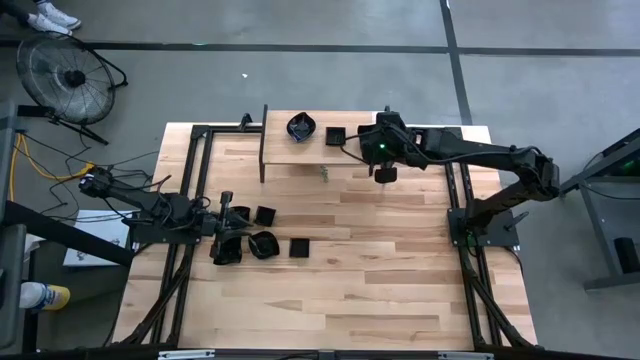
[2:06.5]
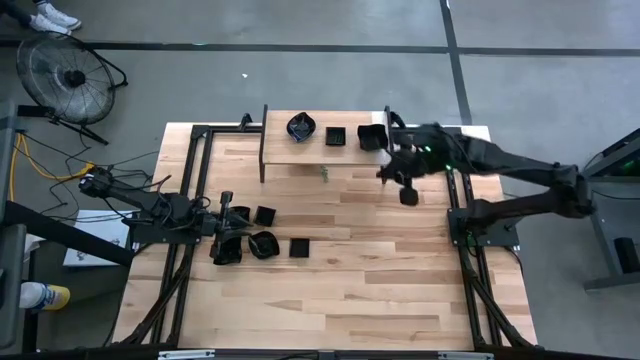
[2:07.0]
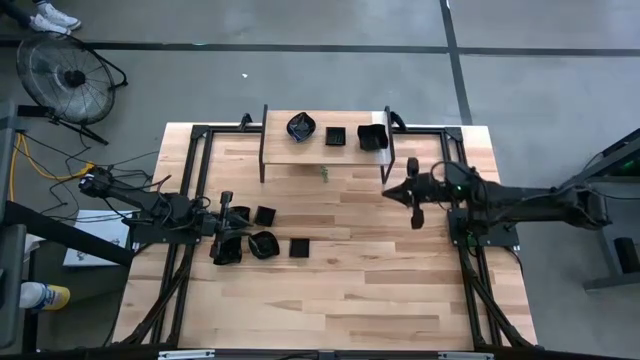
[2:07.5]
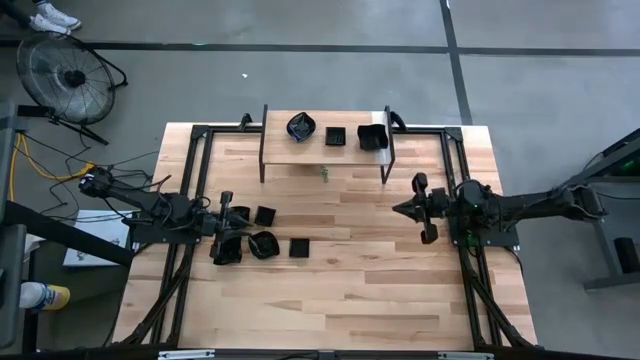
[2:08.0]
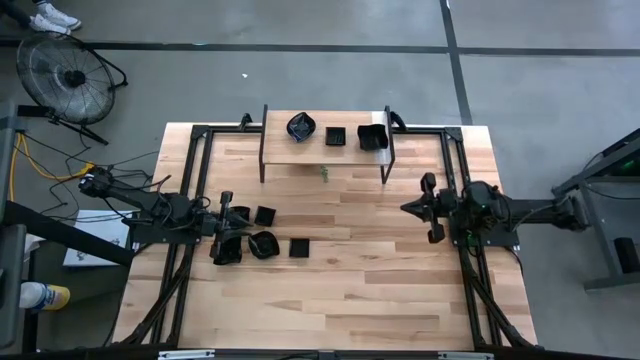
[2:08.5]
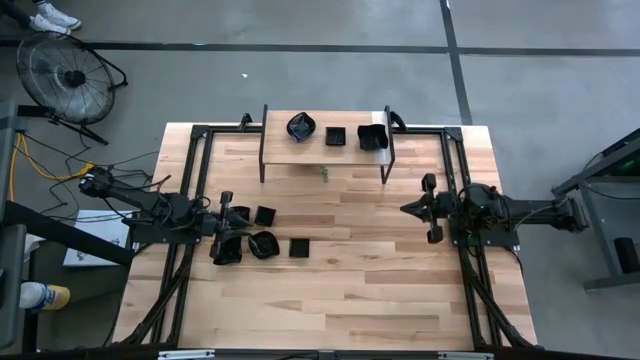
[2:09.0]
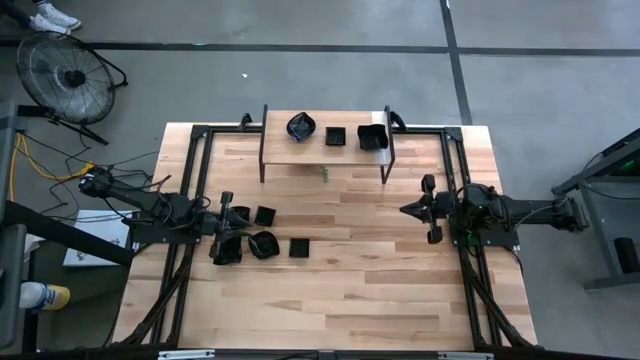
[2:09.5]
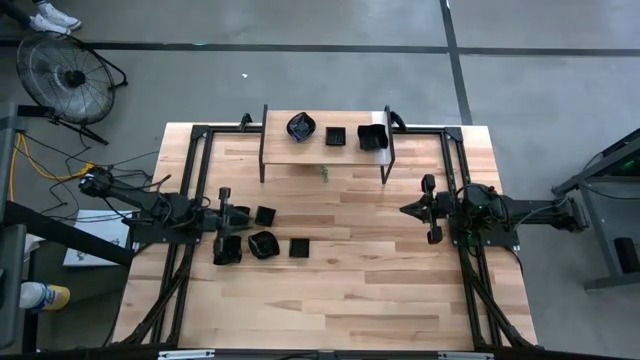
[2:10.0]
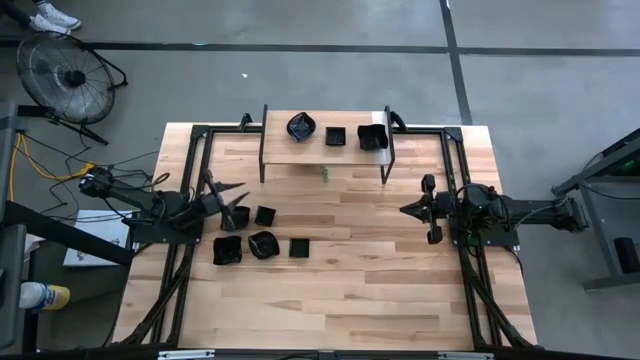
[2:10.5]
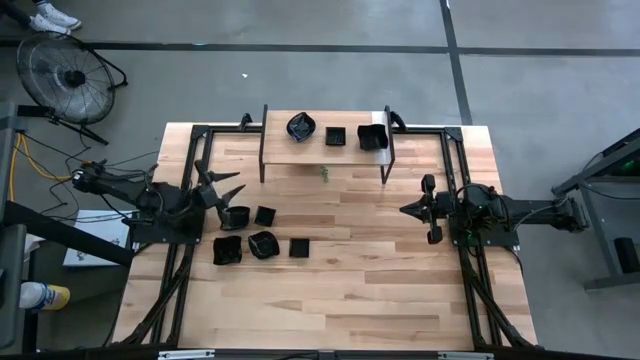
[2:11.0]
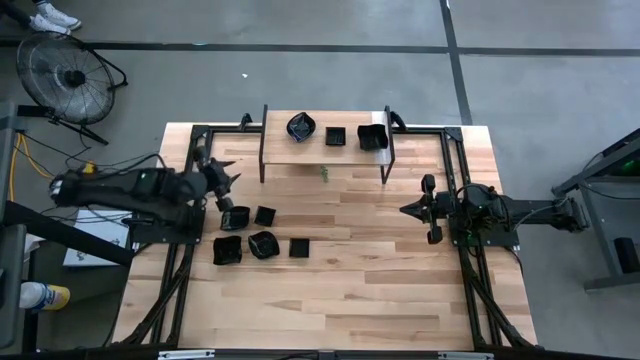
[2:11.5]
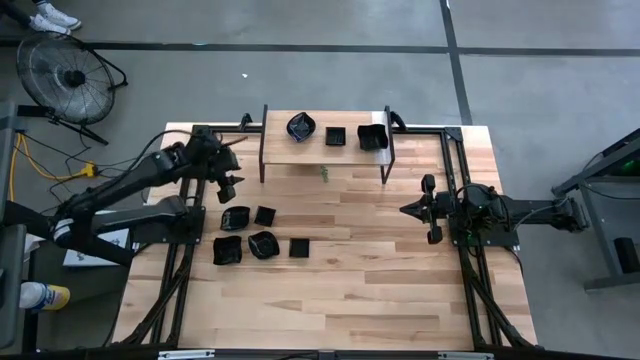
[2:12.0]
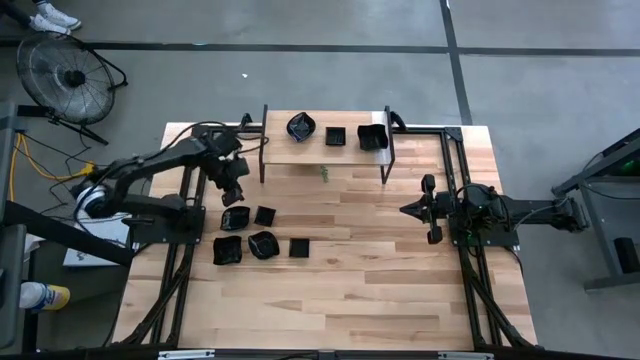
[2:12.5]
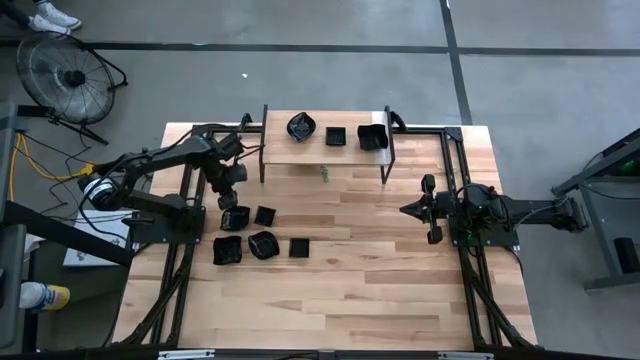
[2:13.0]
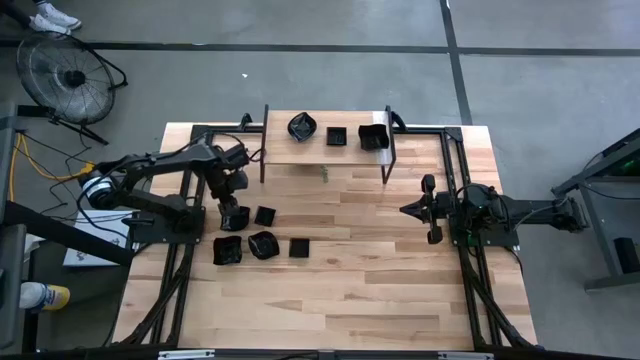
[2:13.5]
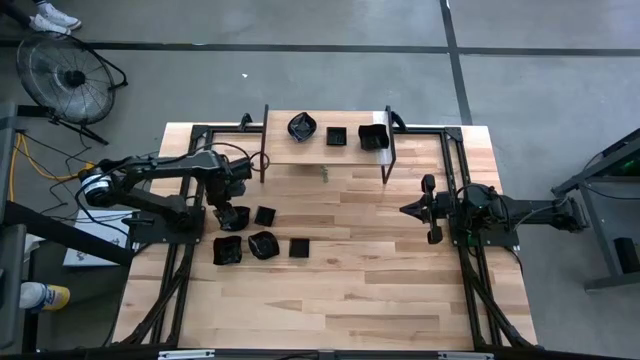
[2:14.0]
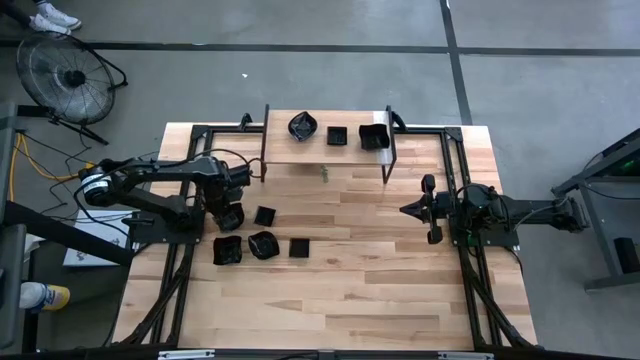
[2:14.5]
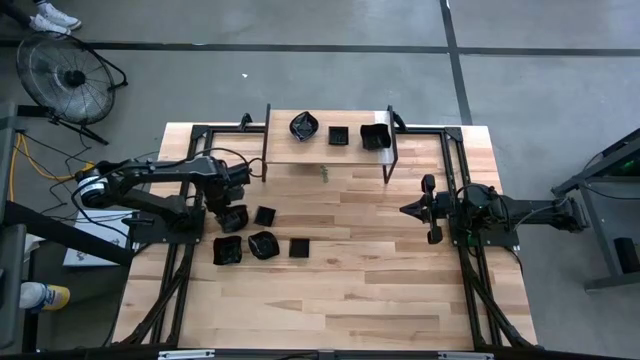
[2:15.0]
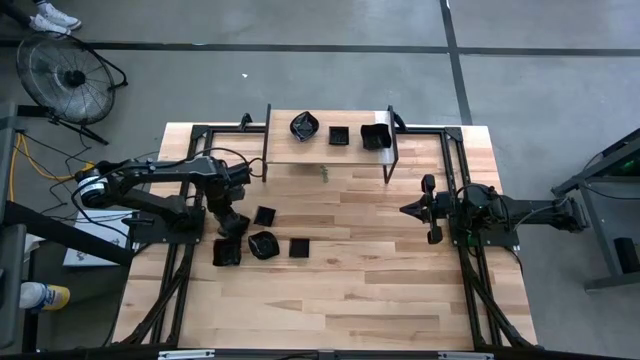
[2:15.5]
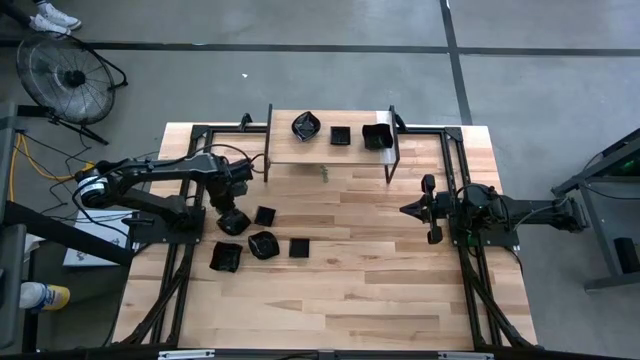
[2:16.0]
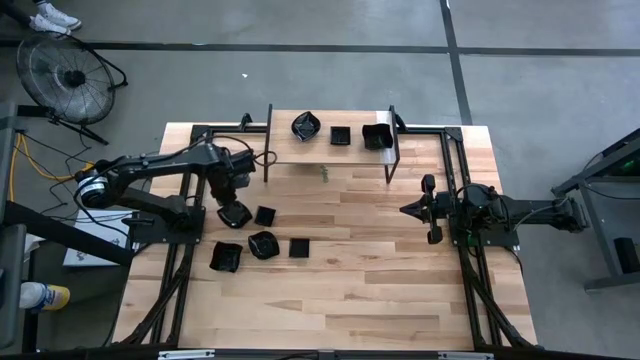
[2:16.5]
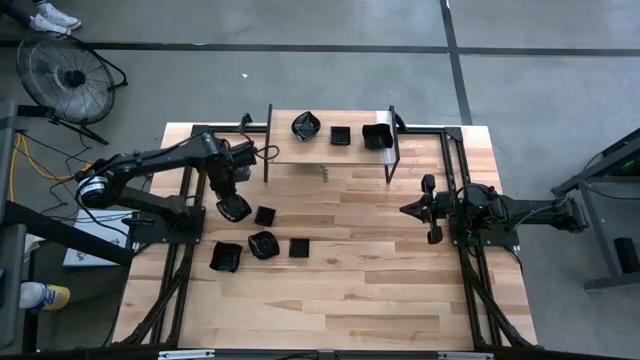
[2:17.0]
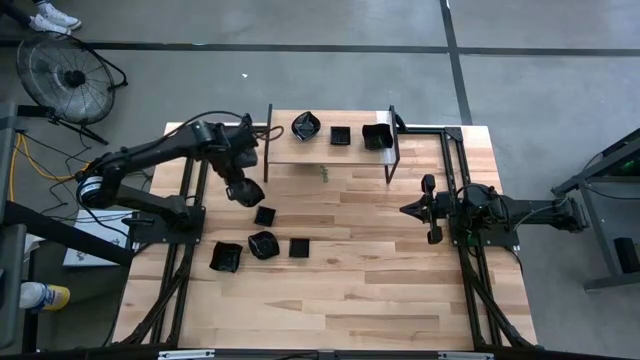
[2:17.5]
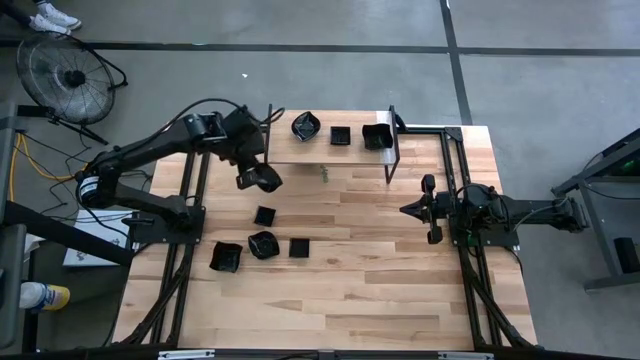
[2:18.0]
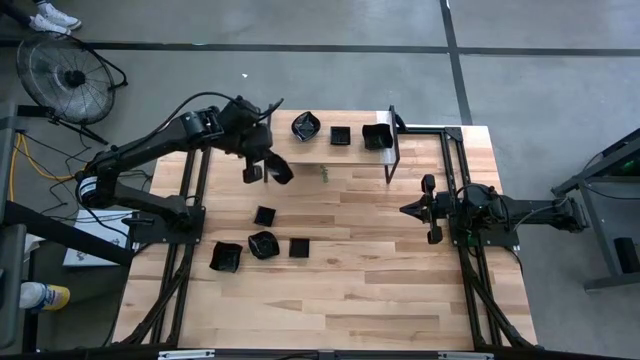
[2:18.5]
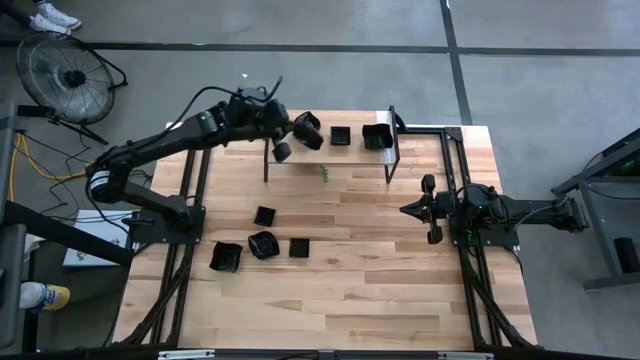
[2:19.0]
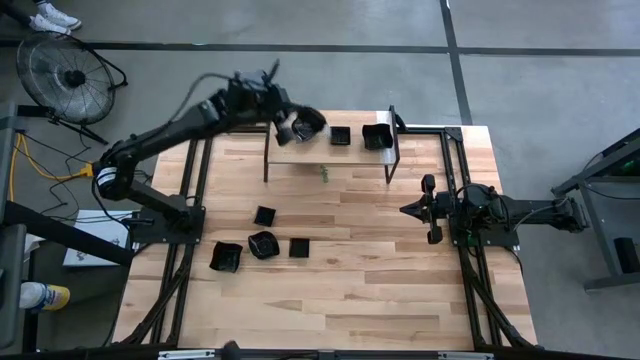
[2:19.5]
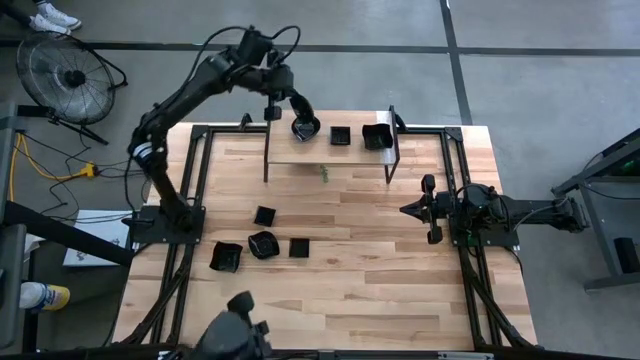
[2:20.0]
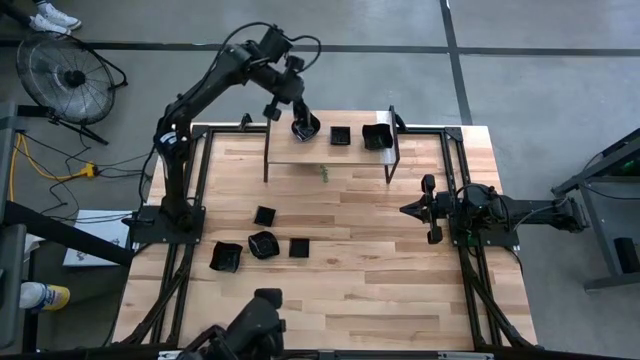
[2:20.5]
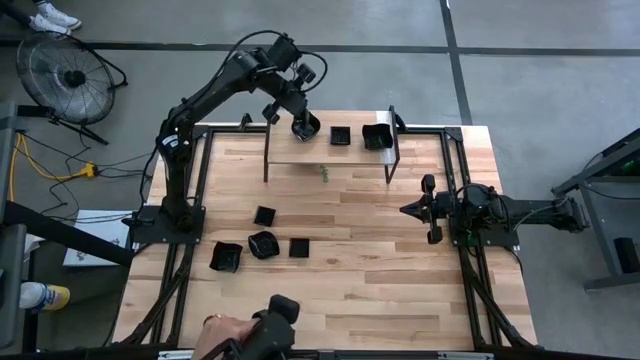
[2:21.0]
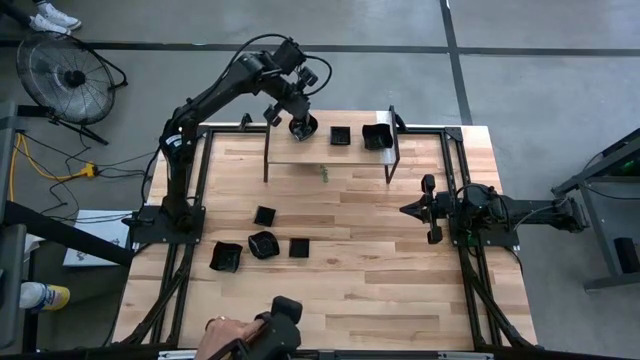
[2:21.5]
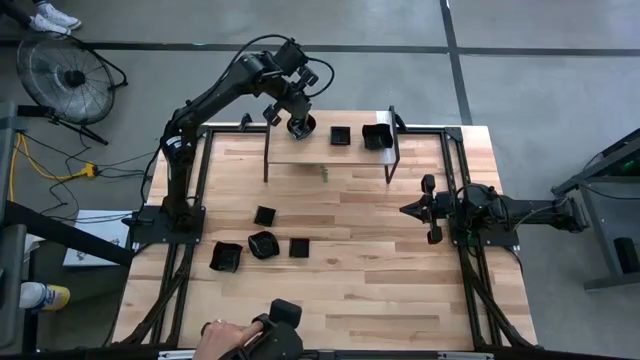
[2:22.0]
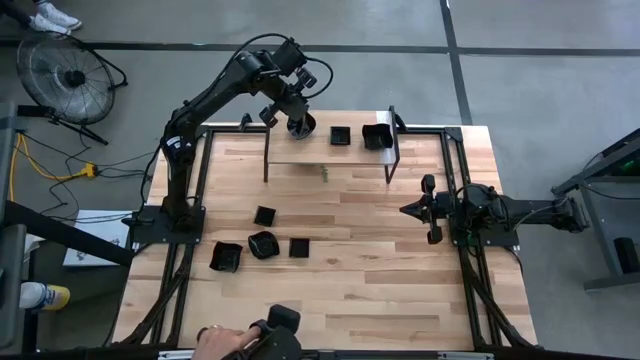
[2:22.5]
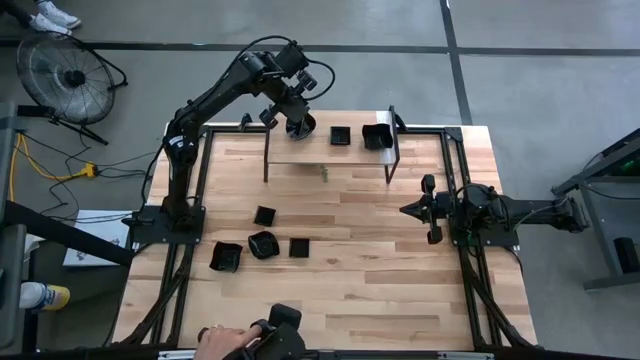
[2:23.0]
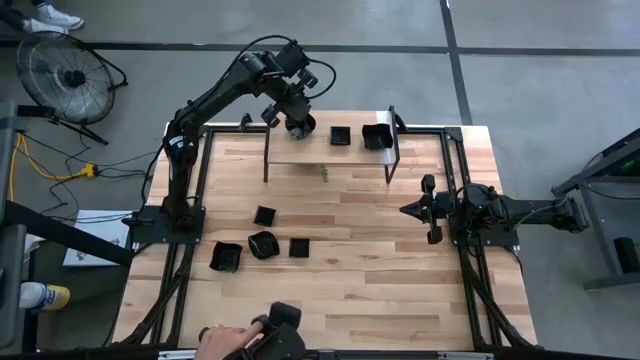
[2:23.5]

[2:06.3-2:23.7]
Task: Pick & Place Mini shaped plates
Stack the leaf shaped plate on top of the other leaf shaped plate on the shelf

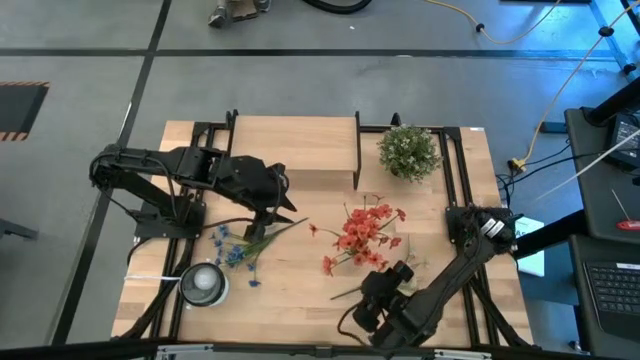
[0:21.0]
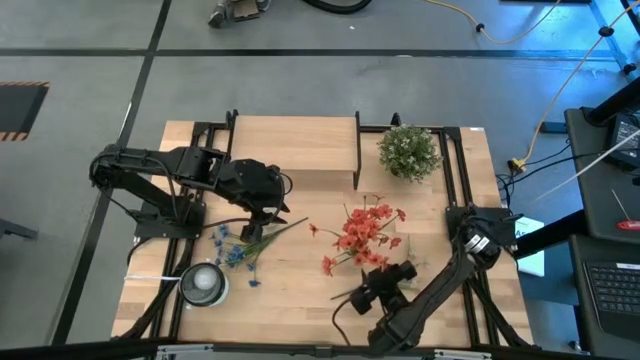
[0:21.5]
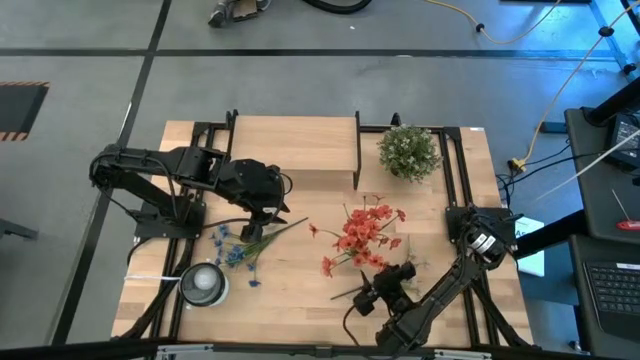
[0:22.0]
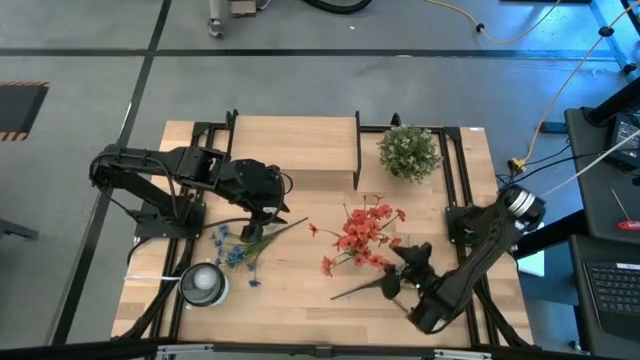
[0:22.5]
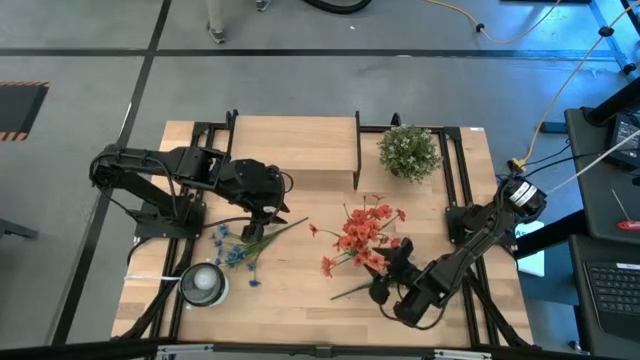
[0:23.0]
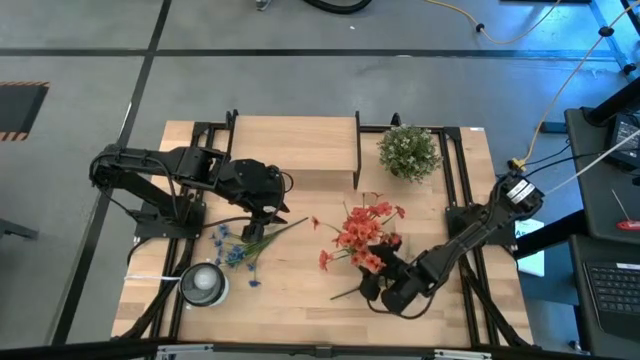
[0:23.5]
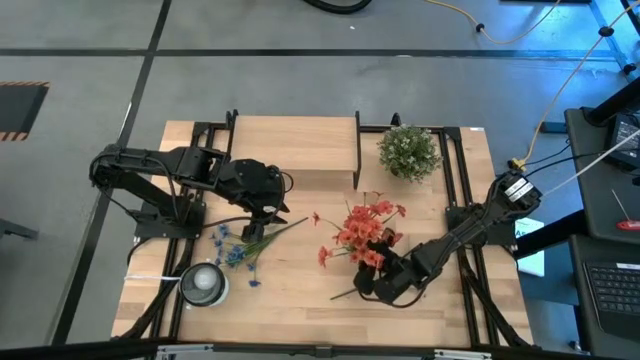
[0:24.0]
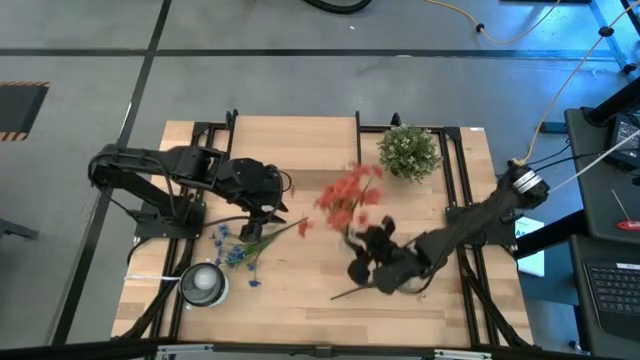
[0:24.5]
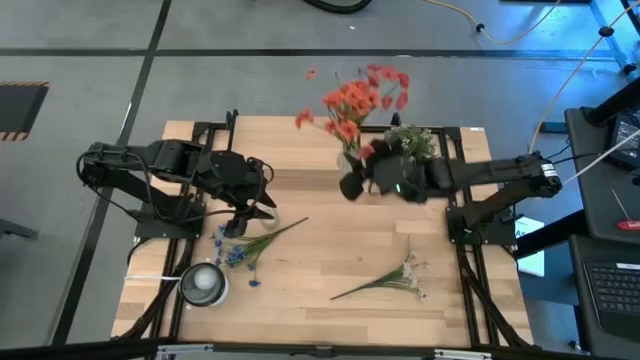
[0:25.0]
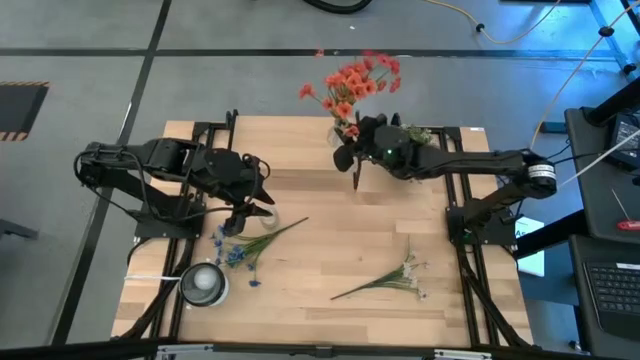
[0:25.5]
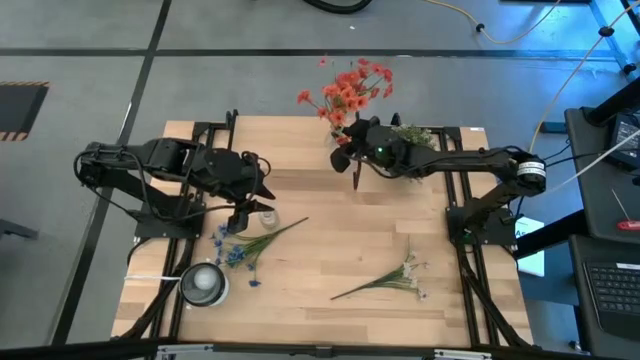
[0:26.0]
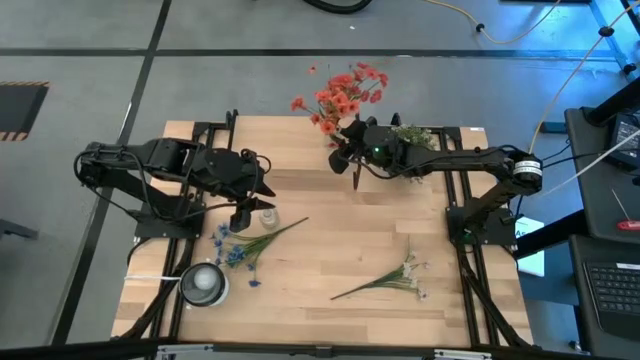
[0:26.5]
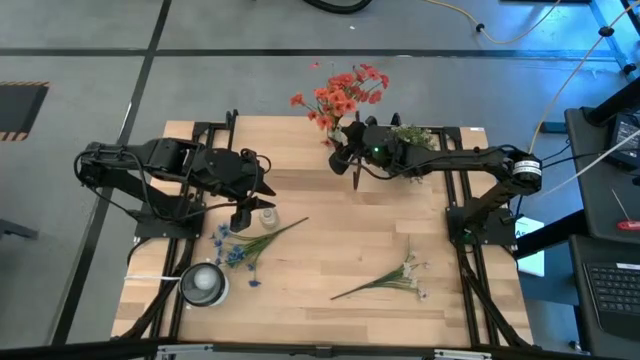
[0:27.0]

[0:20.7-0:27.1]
Task: Pick and place flowers into a vace then onto a shelf
Put the right transparent vase with orange flowers on the shelf
